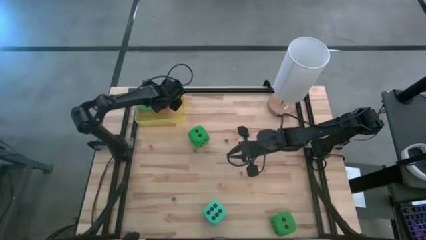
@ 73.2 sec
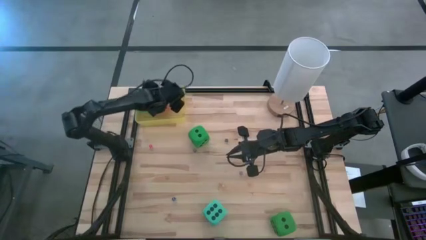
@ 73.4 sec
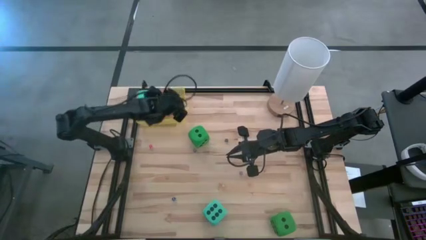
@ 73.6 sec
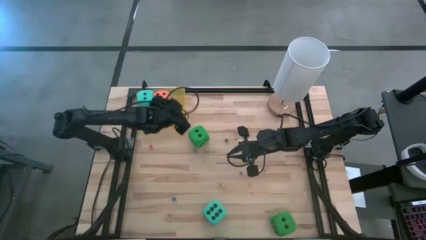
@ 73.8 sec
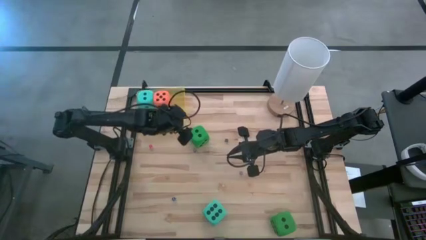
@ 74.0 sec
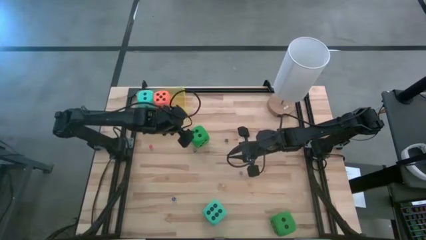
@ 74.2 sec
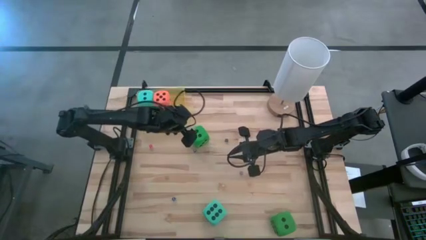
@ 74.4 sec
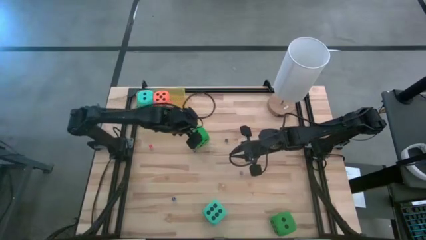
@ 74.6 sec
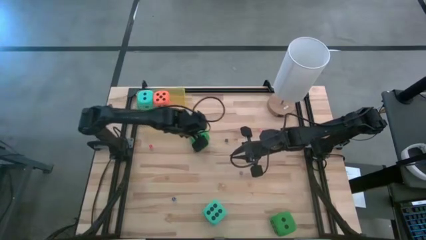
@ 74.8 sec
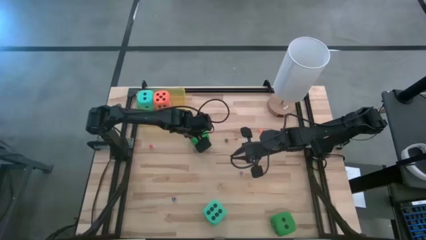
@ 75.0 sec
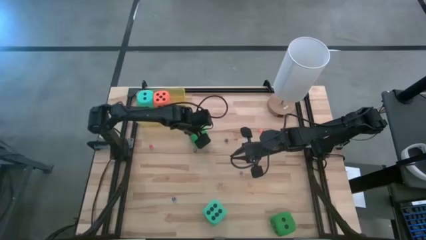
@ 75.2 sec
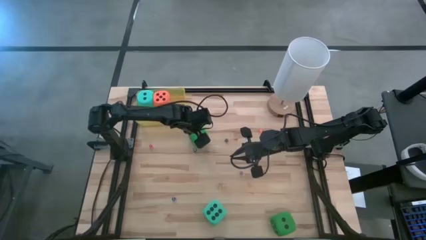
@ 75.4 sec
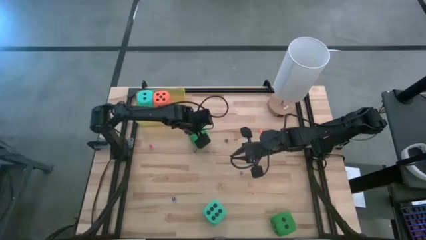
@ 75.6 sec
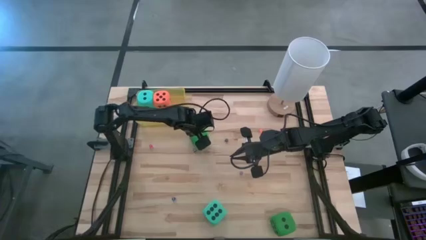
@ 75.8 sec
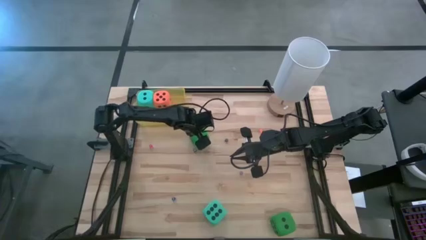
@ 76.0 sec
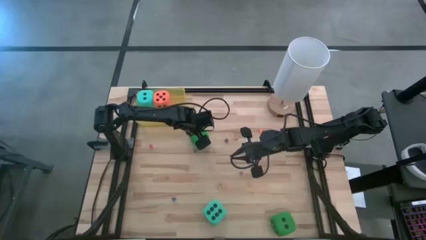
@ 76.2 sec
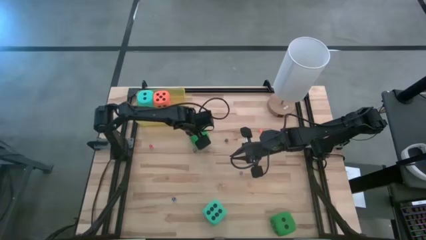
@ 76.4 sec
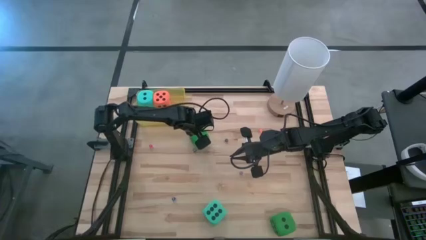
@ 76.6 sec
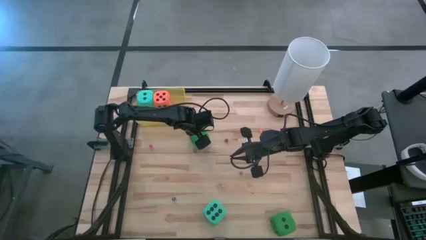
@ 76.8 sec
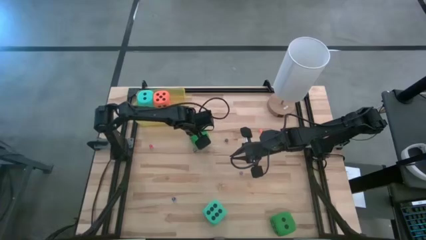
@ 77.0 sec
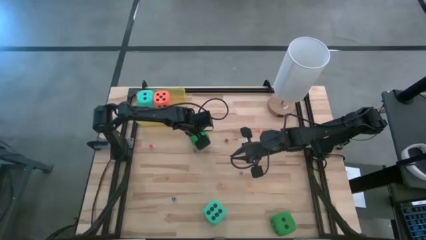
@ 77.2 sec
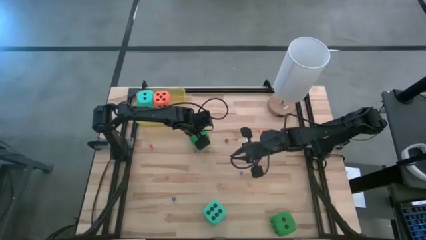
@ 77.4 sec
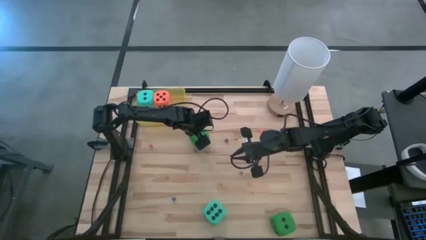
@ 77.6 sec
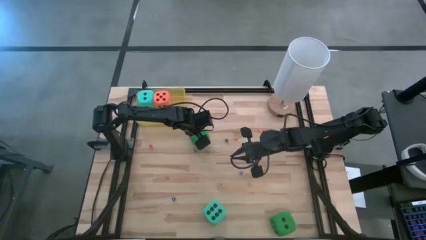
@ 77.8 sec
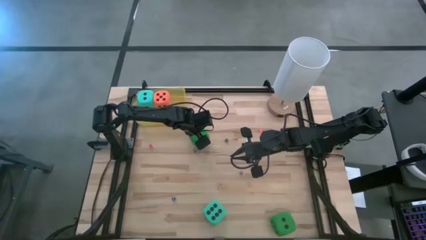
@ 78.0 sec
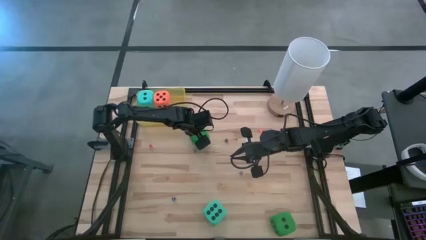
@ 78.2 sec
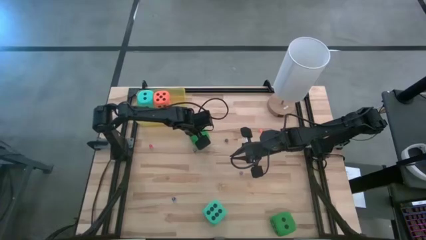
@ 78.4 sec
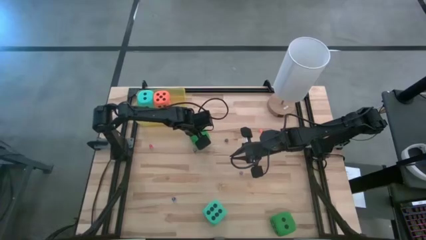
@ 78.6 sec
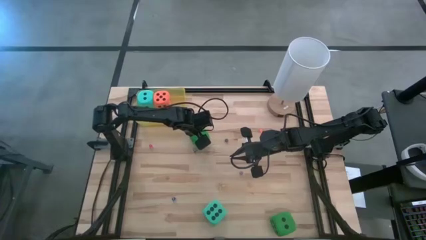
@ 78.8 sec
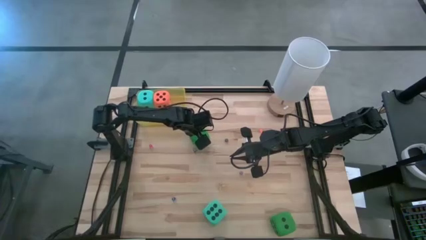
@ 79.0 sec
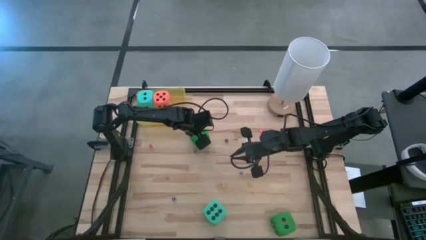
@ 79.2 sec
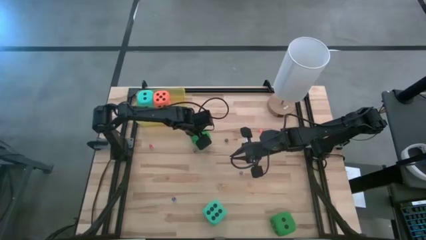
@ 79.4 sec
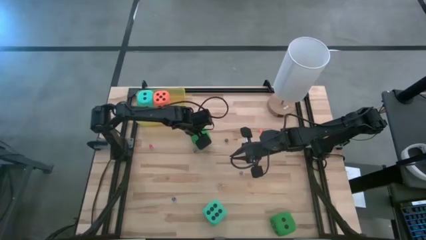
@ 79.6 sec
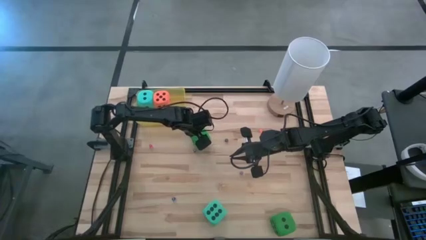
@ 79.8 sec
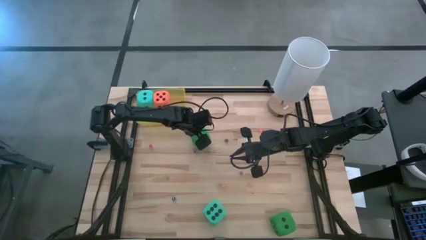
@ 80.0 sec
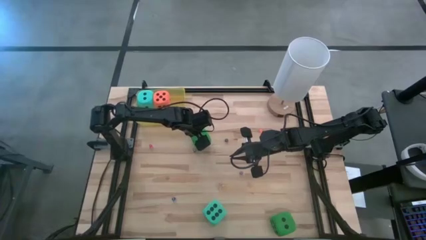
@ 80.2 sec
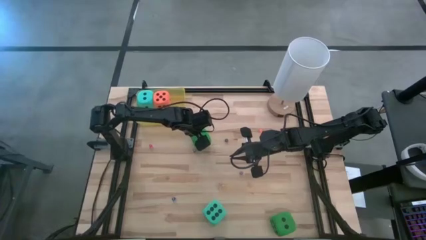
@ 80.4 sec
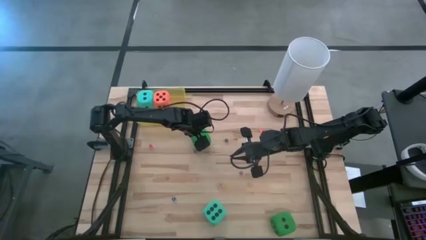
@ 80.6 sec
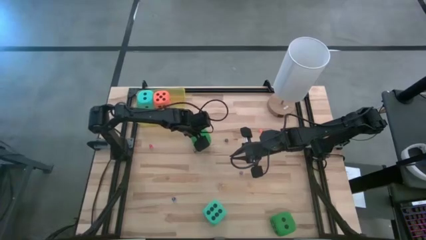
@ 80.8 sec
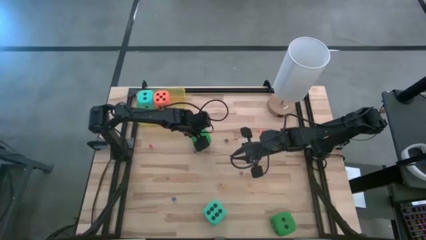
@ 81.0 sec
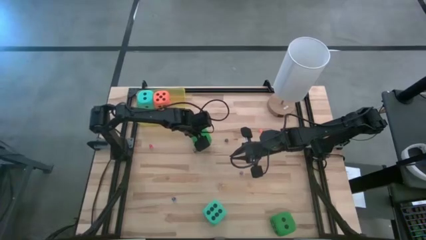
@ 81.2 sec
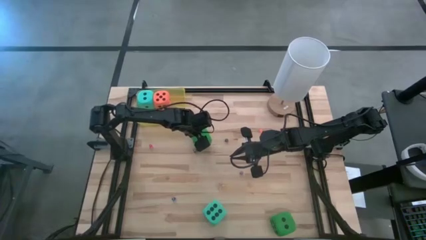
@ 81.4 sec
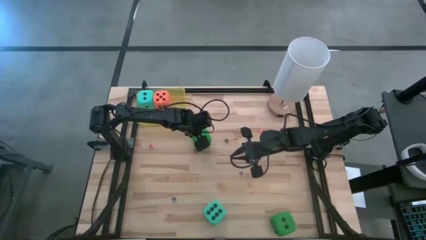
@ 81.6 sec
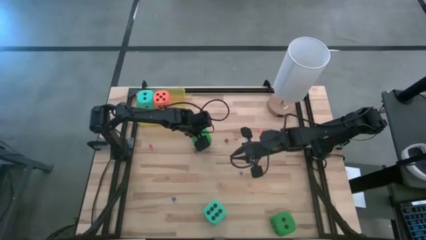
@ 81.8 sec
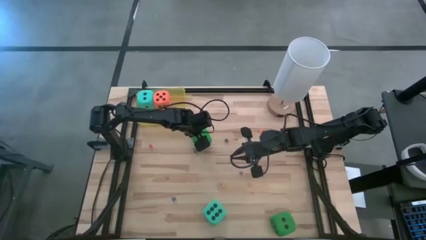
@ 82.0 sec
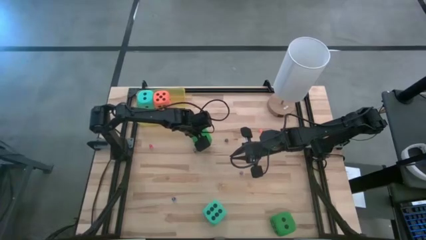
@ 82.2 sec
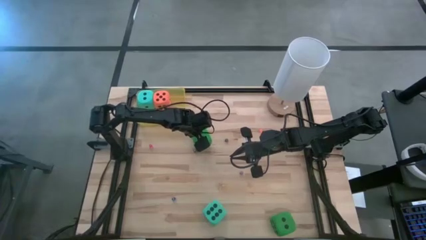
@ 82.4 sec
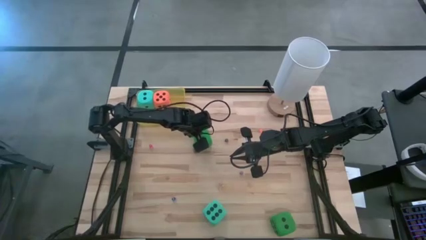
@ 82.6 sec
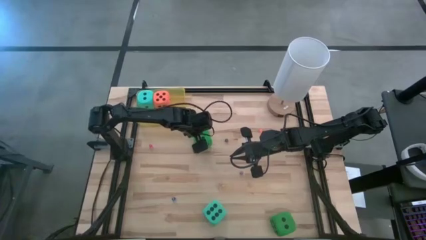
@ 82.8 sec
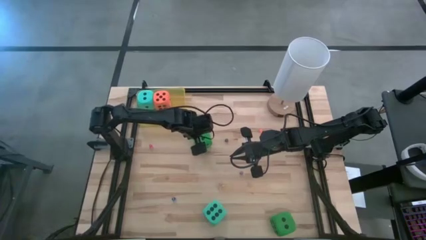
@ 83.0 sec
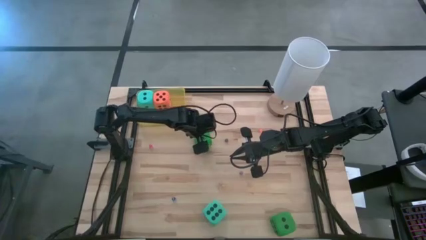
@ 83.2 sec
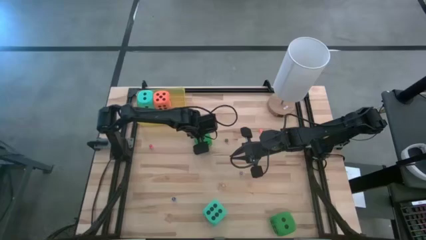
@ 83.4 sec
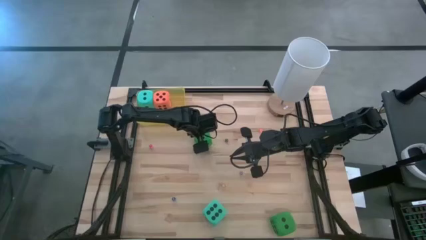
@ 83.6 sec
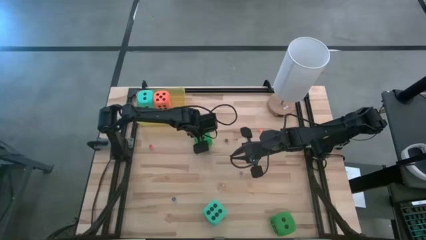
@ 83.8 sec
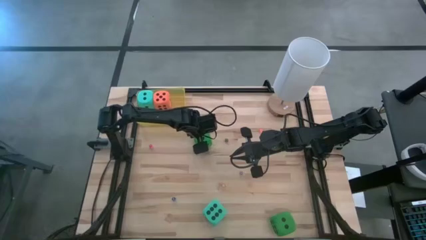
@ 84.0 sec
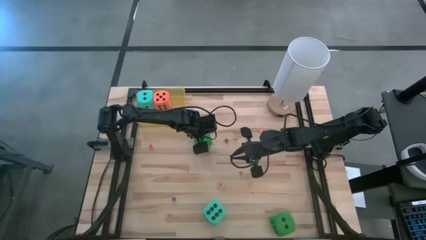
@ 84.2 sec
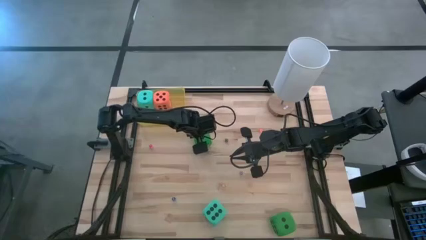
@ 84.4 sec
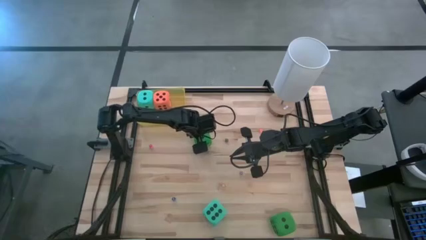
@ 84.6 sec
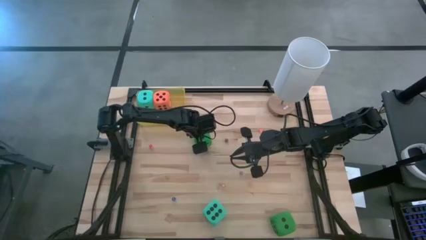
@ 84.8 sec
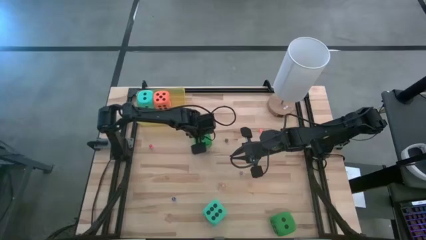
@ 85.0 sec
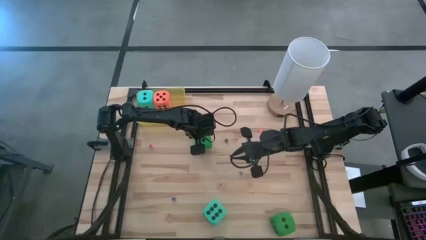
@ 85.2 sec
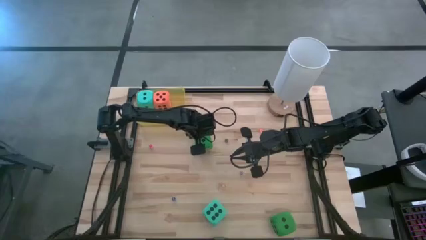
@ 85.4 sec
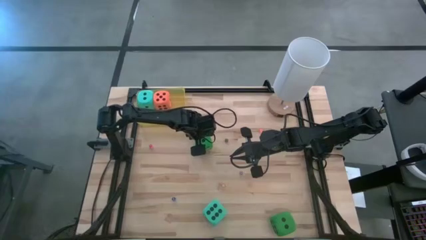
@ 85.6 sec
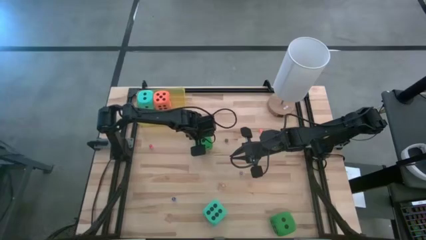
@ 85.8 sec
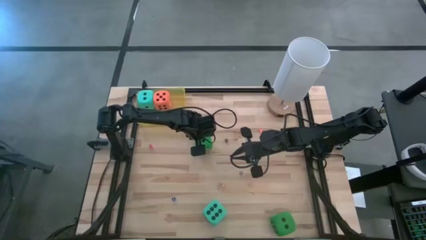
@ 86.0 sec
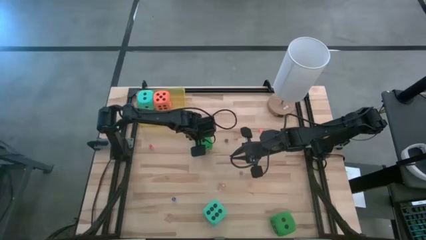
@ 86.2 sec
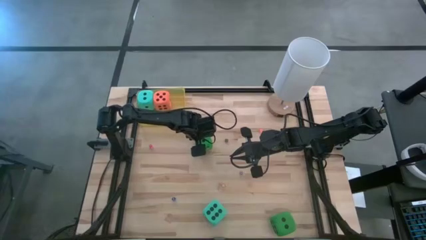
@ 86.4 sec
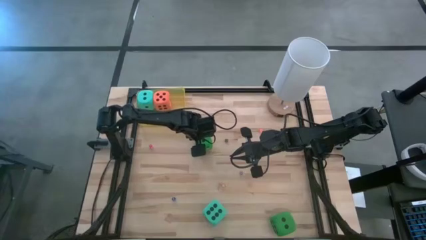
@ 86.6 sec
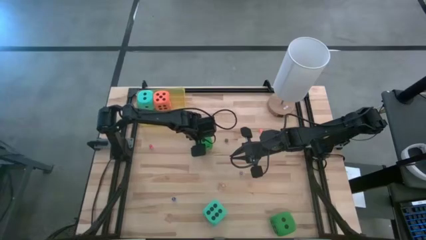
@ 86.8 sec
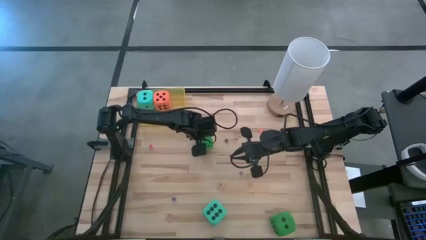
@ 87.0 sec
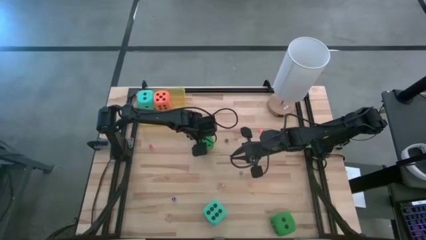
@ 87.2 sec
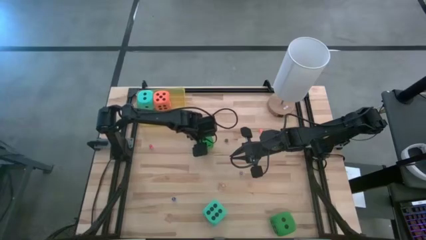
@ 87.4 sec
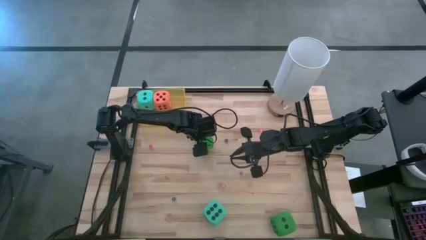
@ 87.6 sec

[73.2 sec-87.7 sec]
Task: Pick & Place Dice
Put the top green large die into the yellow bin

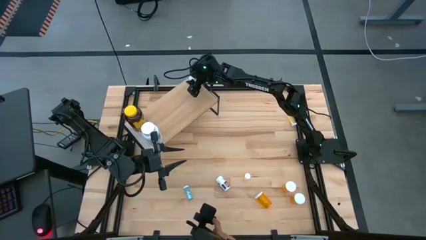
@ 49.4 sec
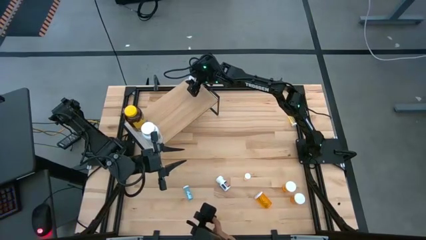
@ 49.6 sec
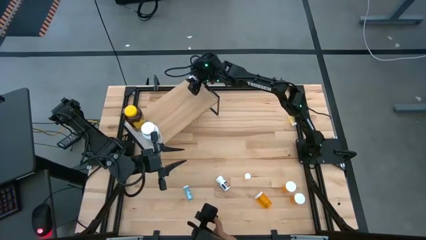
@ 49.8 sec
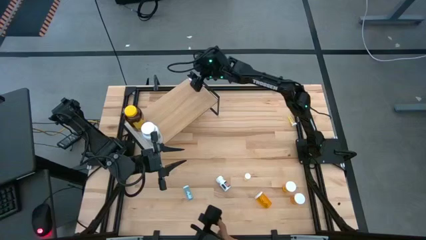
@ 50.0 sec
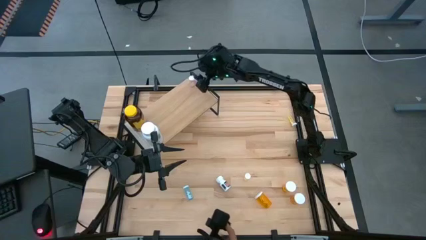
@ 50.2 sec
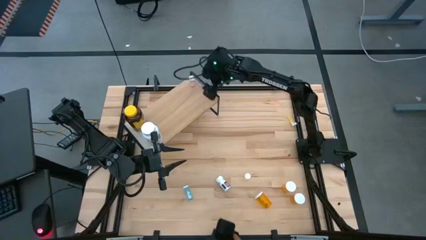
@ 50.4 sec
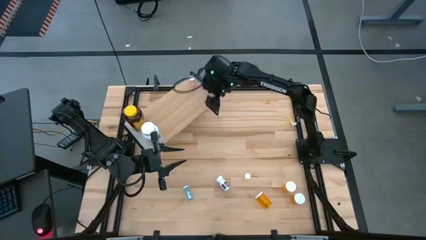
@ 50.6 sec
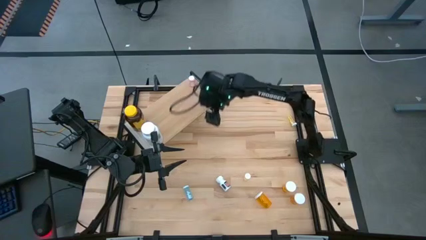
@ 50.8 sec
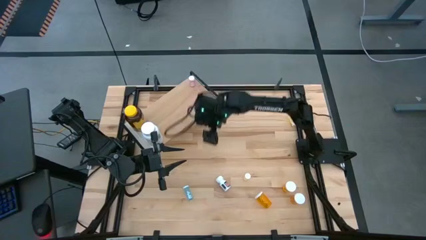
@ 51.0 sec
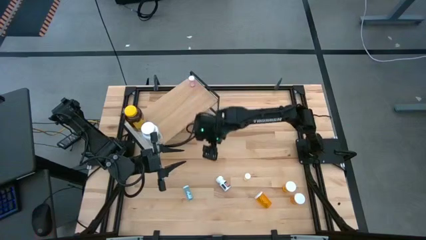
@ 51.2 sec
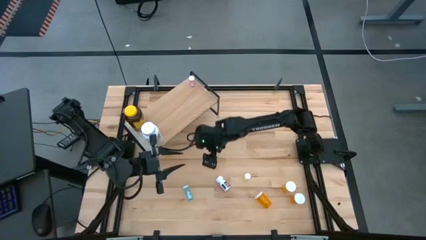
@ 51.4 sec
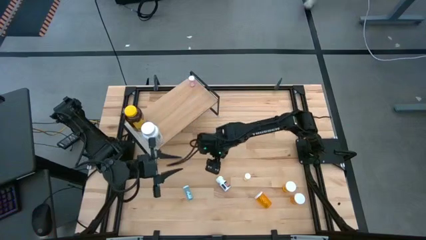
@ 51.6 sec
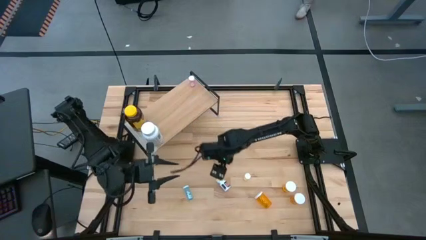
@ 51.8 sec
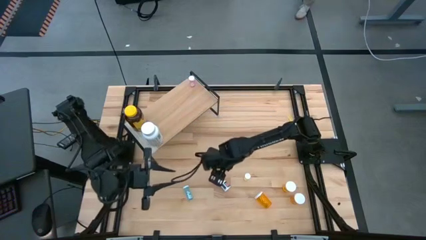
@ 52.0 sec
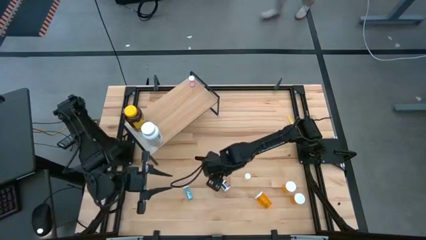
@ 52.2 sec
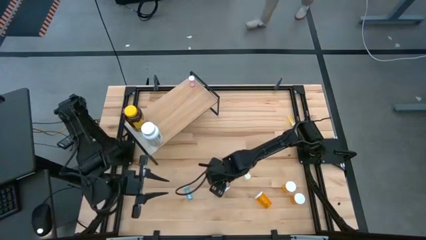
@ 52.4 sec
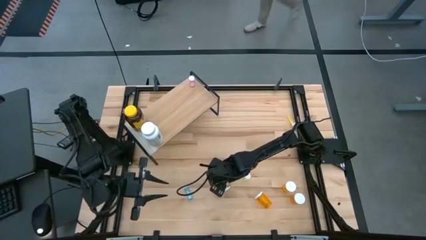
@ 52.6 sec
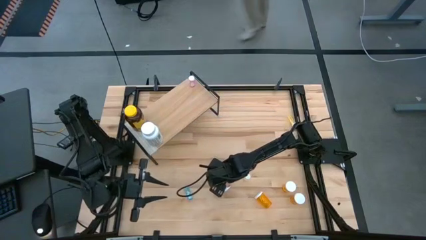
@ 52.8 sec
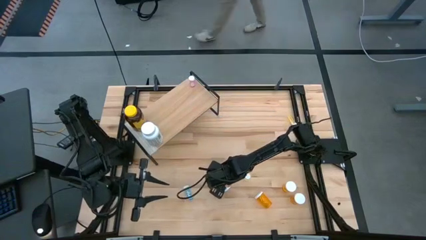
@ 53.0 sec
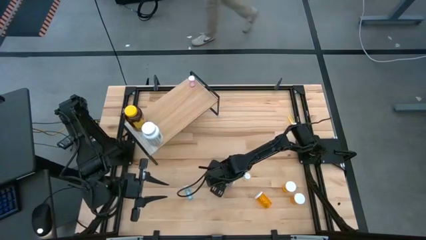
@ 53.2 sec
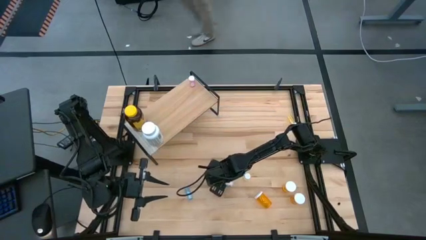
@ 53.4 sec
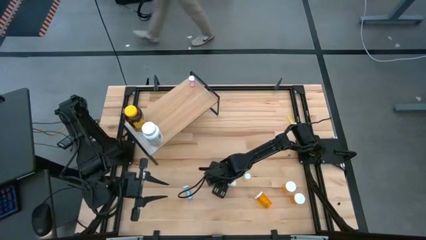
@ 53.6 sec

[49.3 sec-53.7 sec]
Task: Pick and place medicine bottles onto shelf by color
Put the small white pill bottle on the shelf
